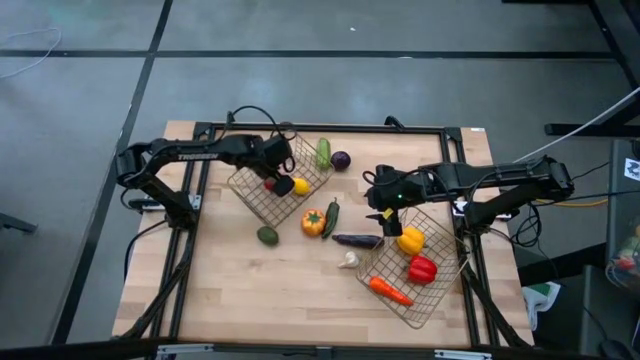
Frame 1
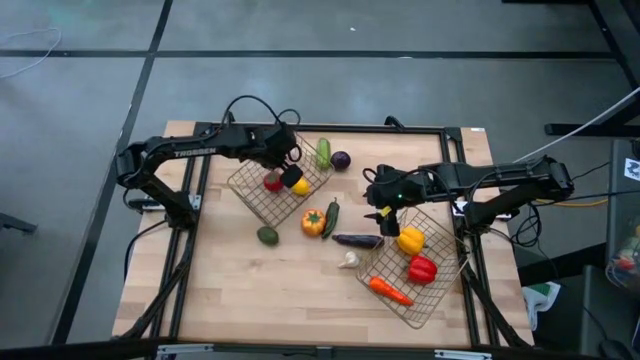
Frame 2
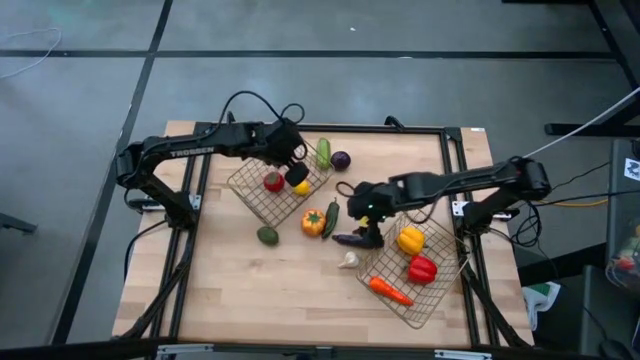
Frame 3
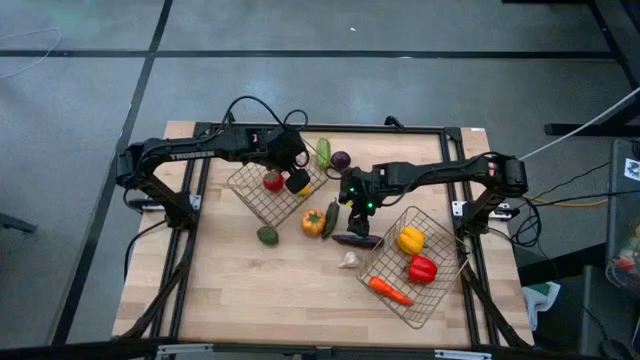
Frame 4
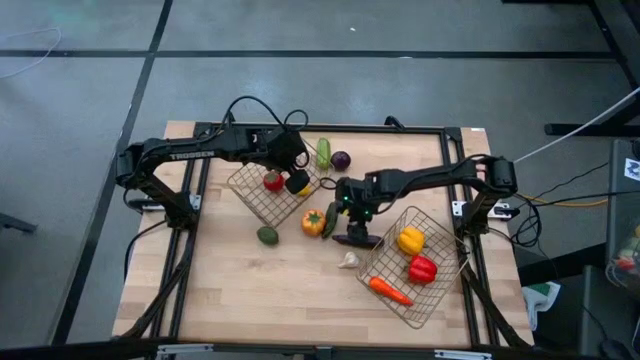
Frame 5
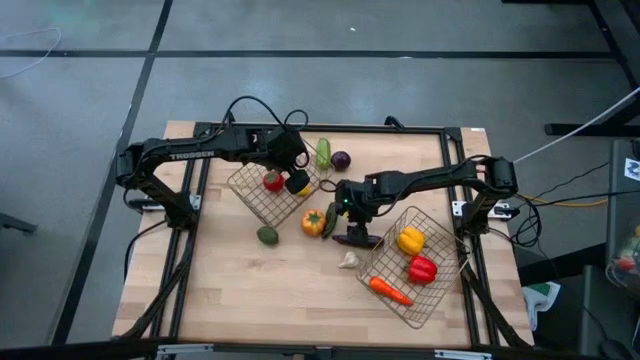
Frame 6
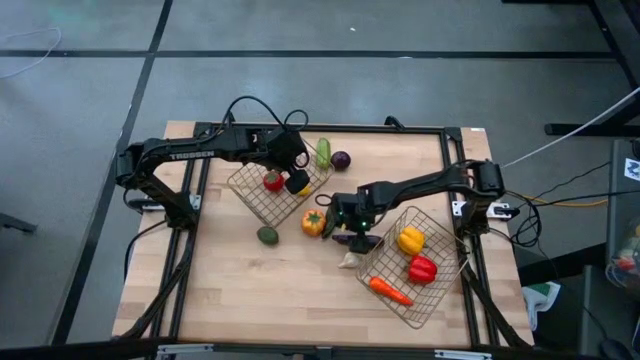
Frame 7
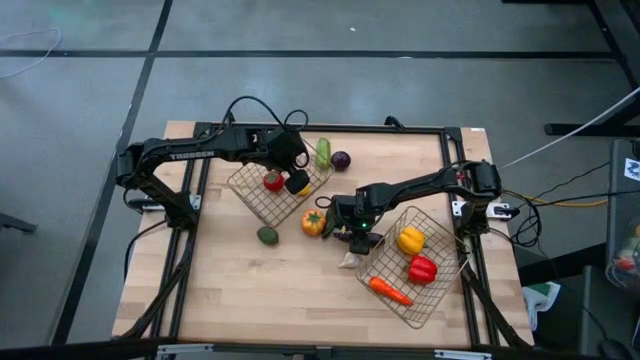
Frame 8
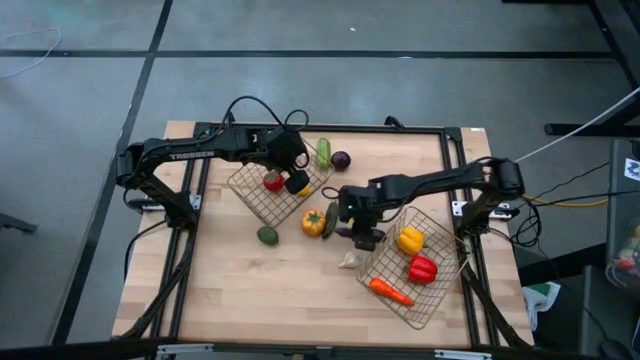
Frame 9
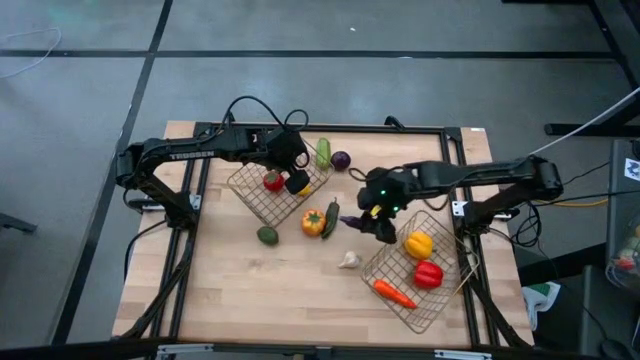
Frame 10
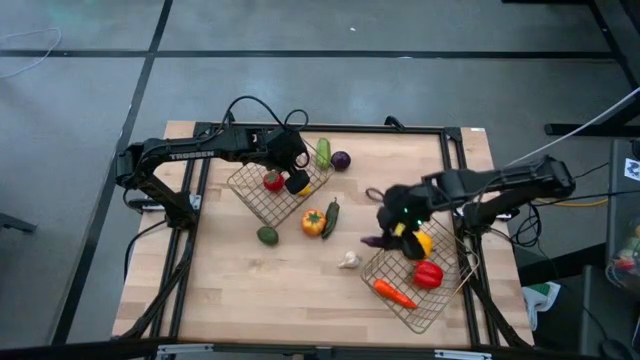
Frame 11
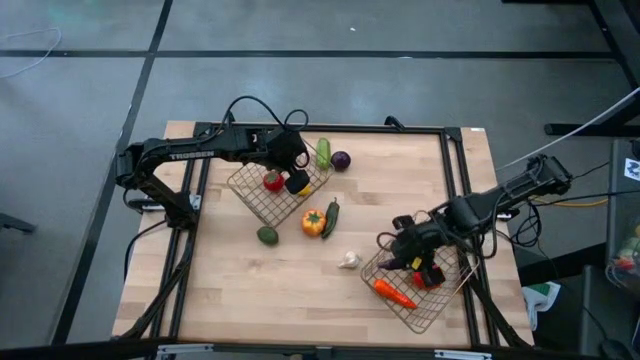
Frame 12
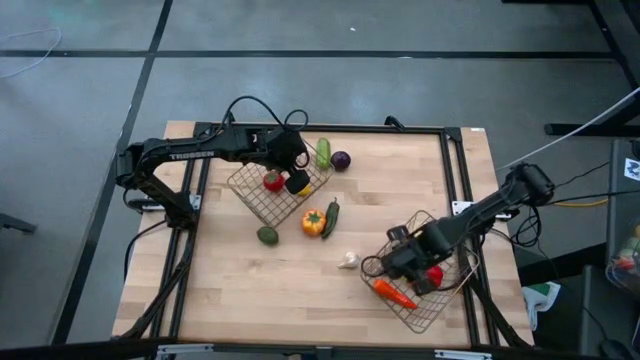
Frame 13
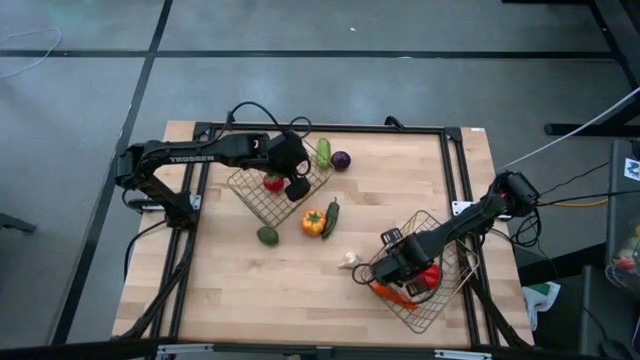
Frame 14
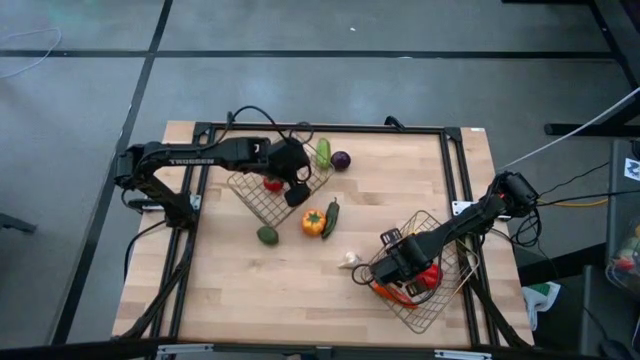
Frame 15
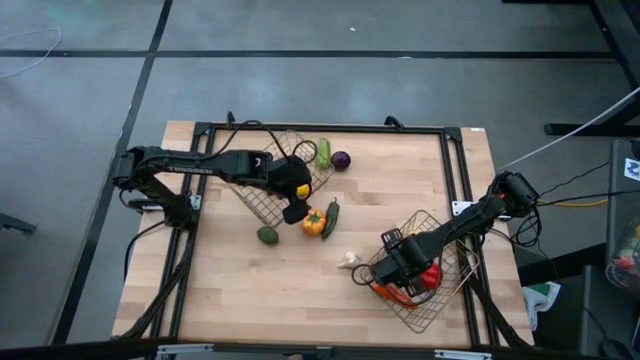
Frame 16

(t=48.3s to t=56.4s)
Task: Sort produce into baskets
Put the eggplant into the bottom basket

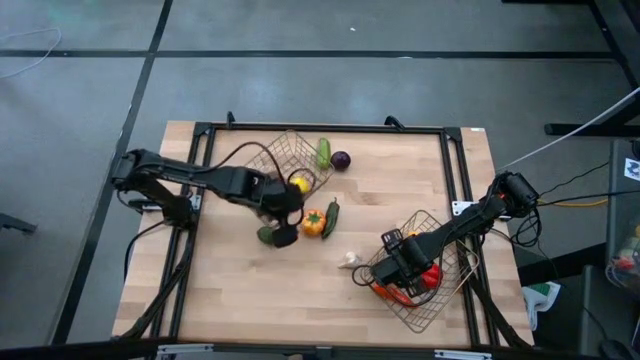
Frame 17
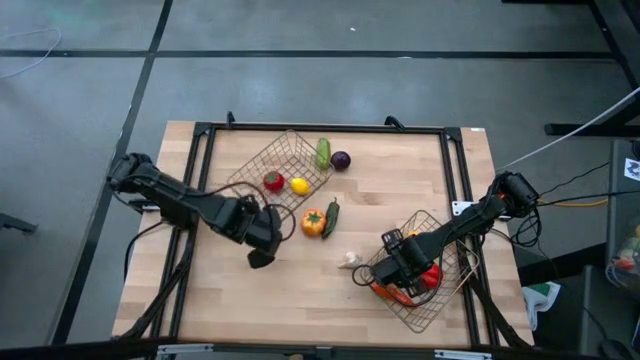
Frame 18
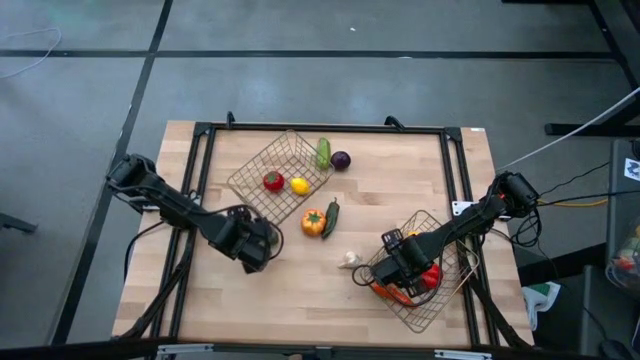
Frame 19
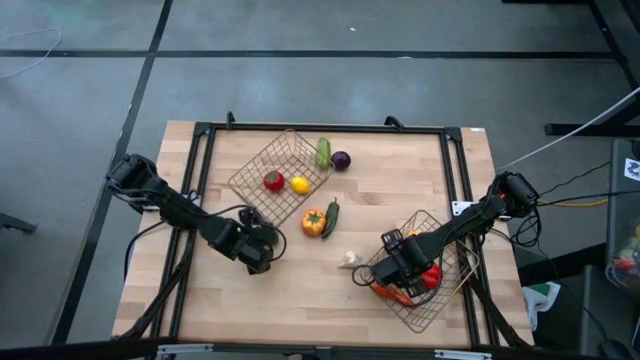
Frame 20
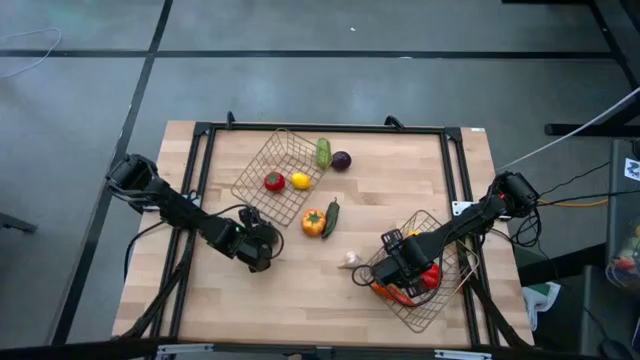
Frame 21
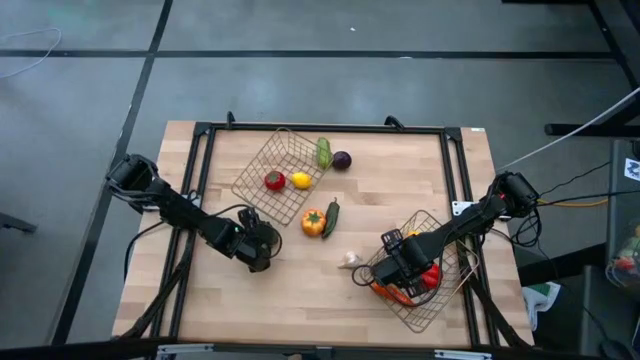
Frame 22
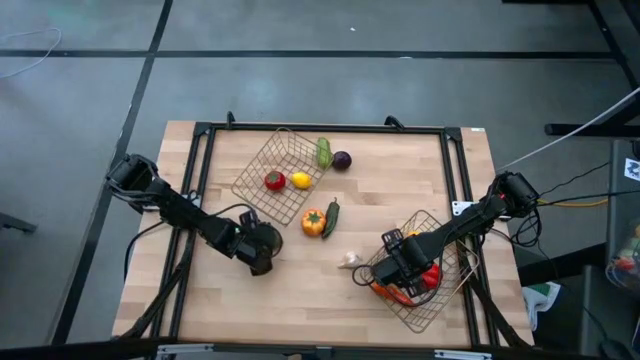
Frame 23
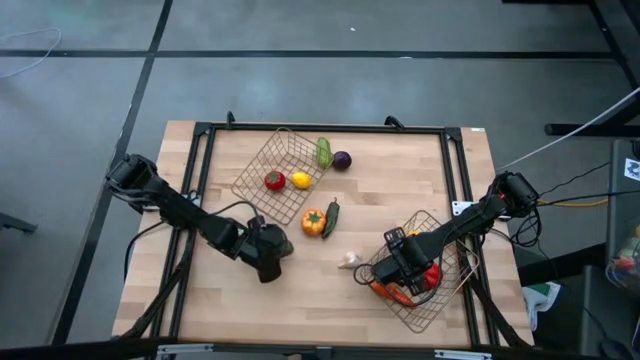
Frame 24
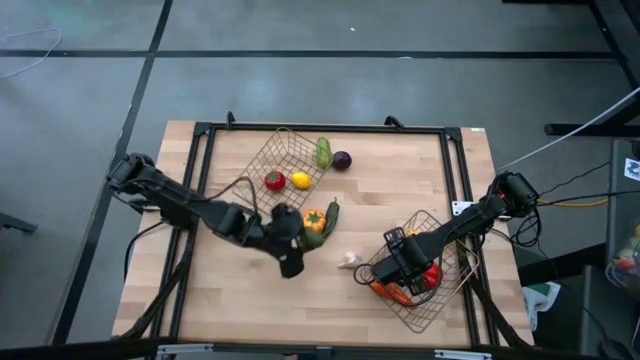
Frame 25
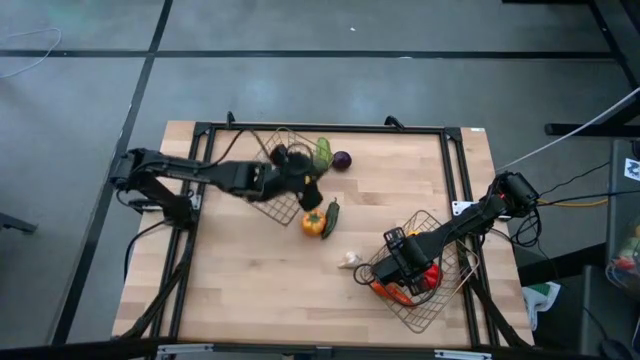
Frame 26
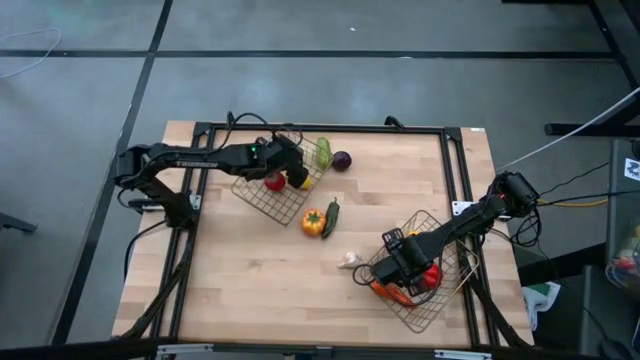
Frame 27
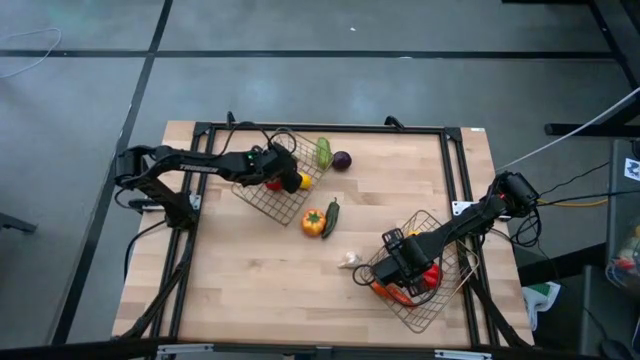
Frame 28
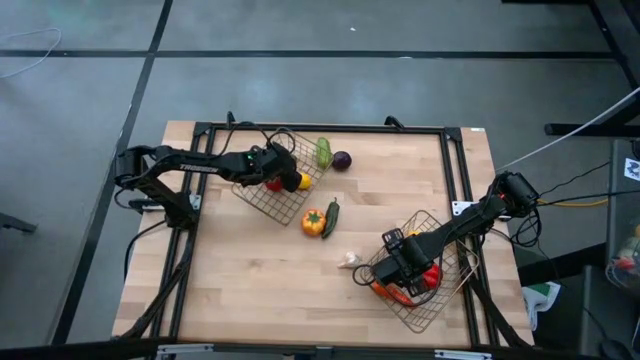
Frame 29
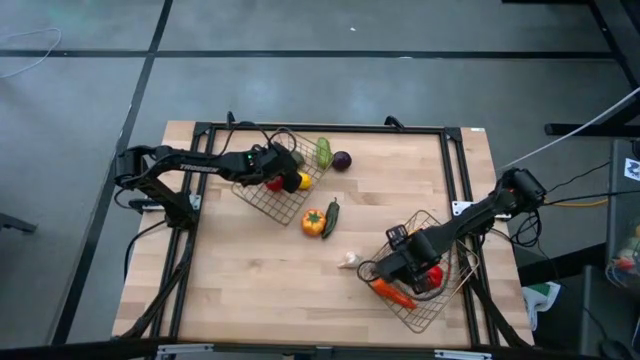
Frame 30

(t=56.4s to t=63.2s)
Put the avocado into the top basket

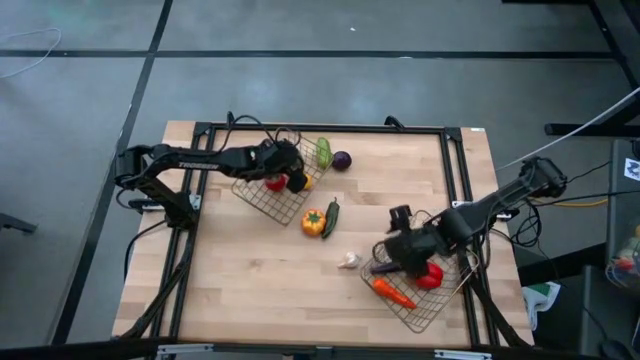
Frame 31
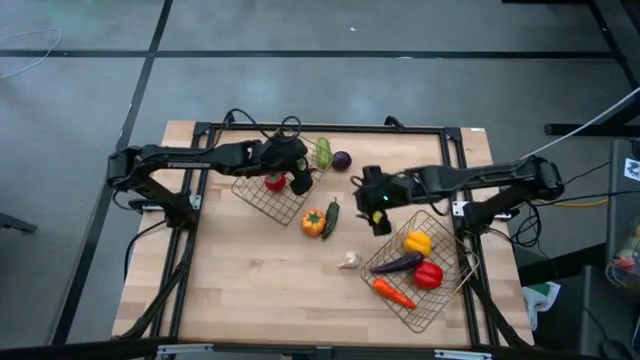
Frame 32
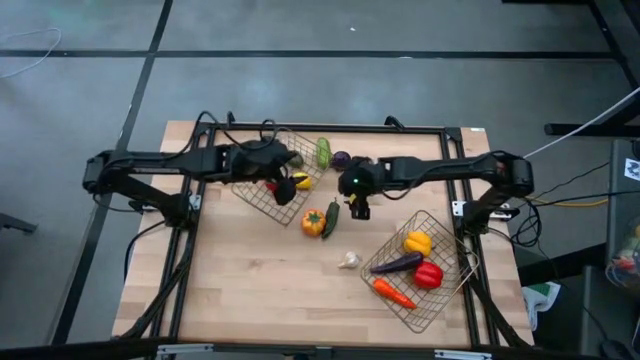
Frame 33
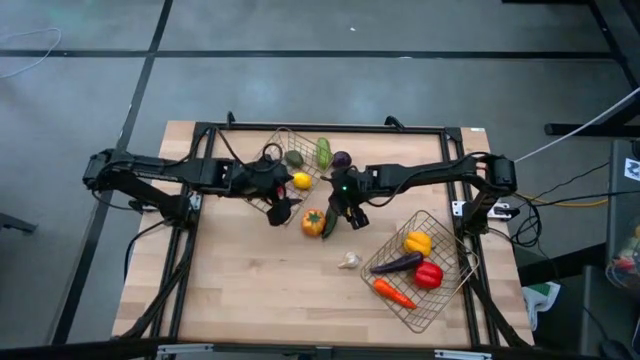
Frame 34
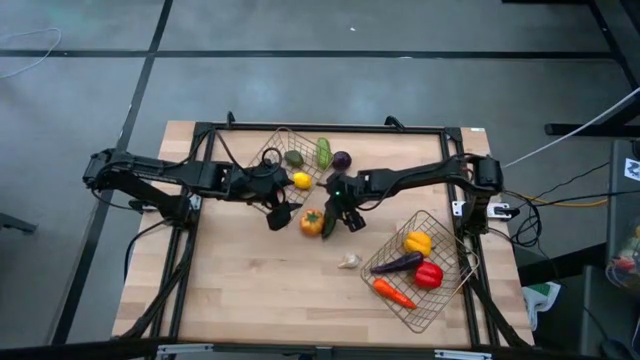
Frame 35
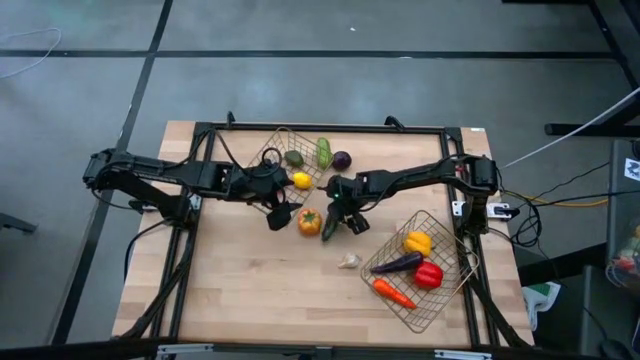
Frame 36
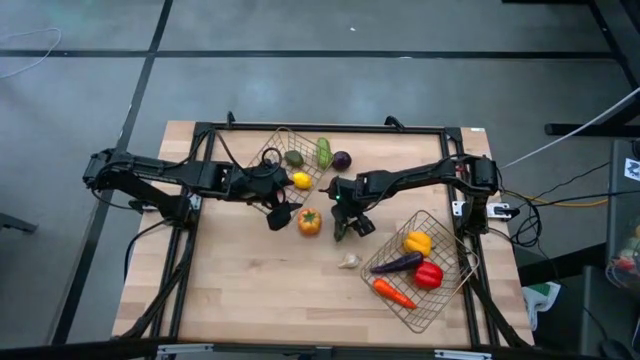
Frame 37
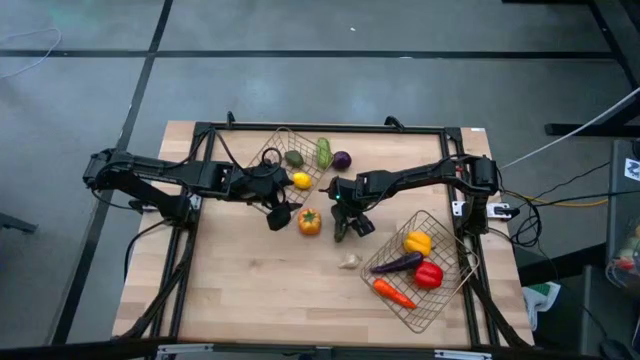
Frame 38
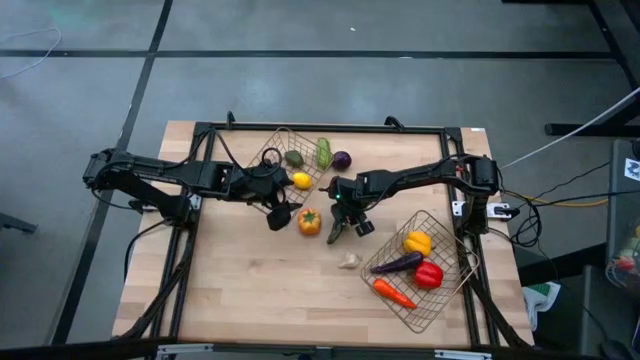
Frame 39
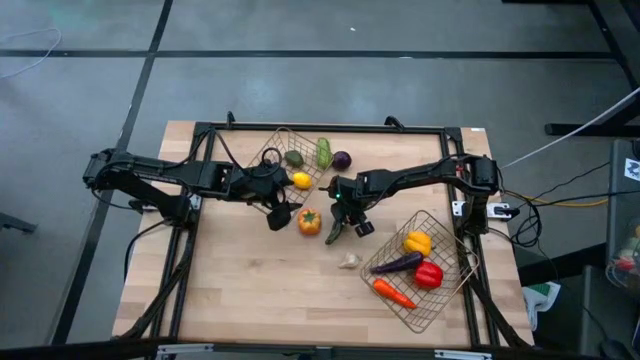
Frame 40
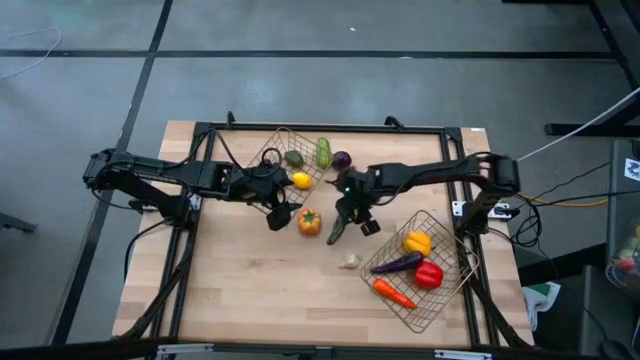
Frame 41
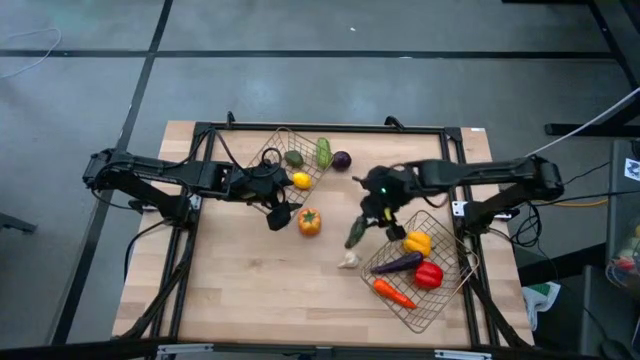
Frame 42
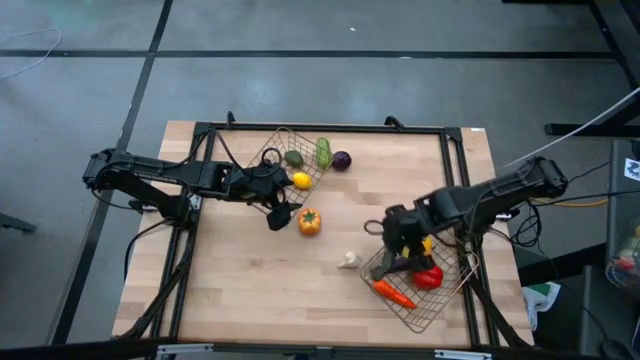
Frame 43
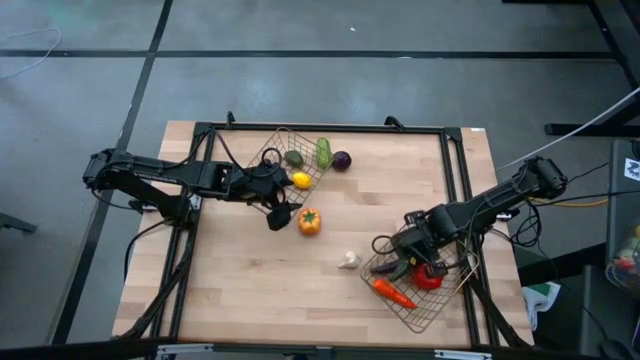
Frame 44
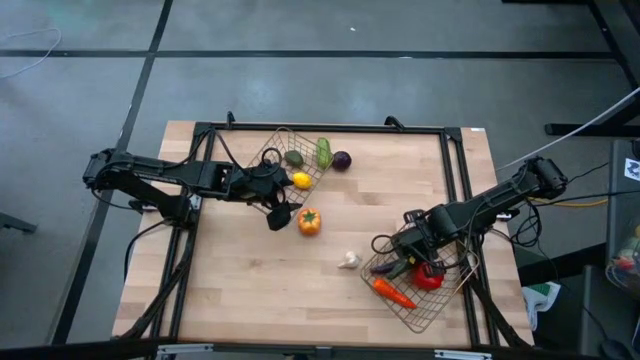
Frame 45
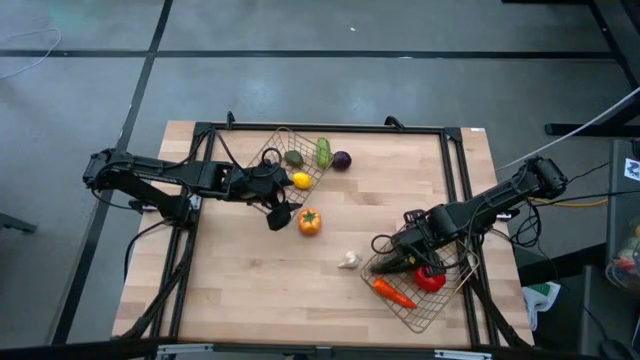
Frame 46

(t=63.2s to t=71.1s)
Put the green chili pepper into the bottom basket
